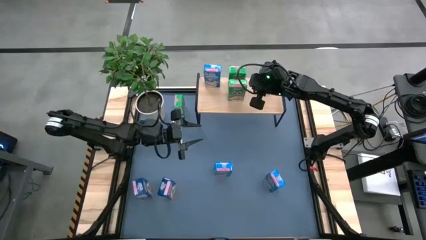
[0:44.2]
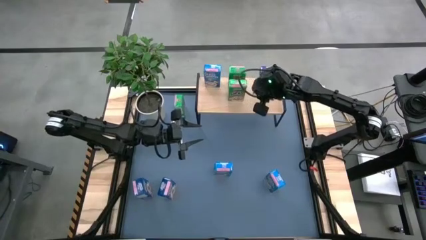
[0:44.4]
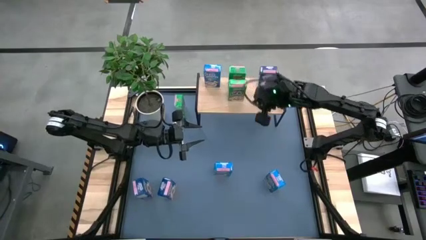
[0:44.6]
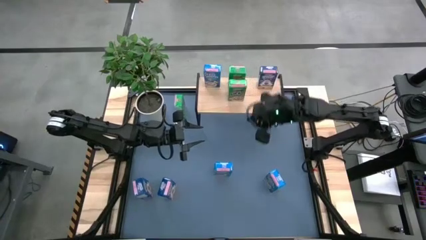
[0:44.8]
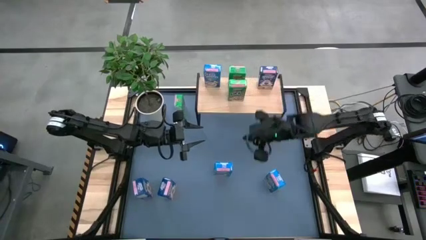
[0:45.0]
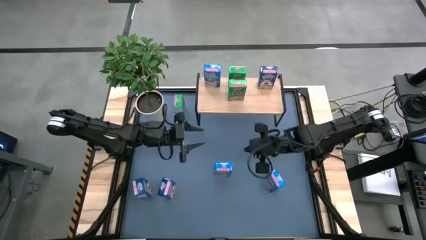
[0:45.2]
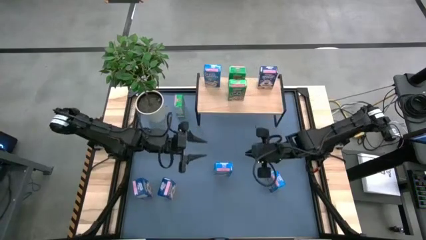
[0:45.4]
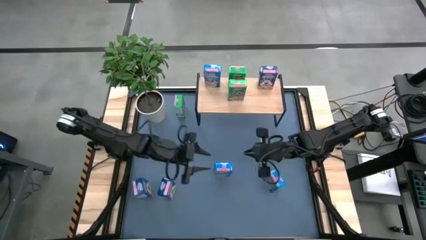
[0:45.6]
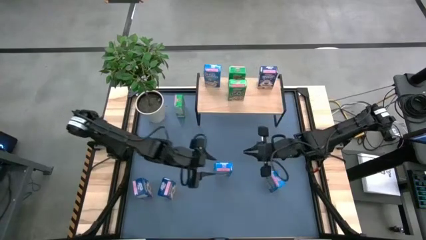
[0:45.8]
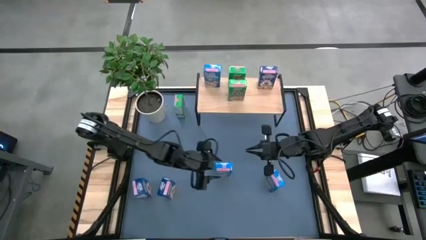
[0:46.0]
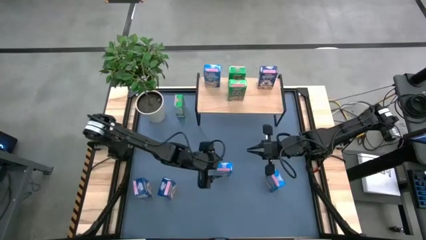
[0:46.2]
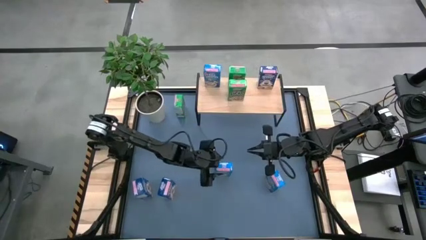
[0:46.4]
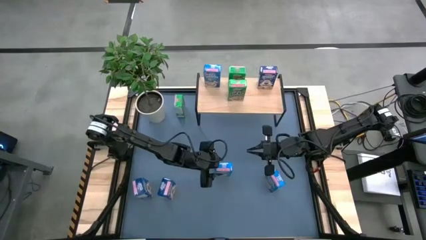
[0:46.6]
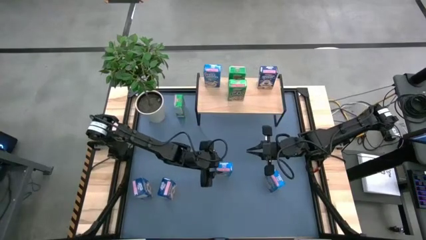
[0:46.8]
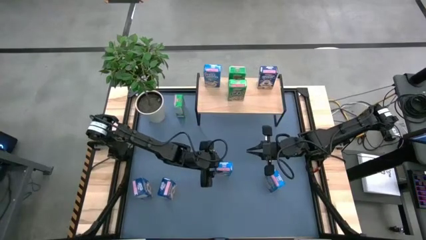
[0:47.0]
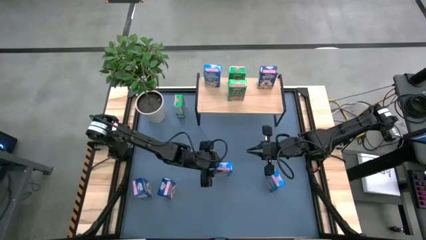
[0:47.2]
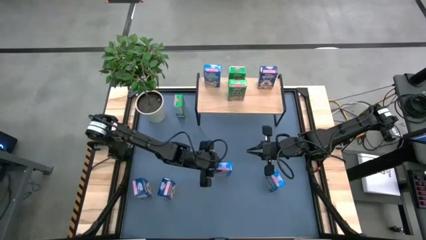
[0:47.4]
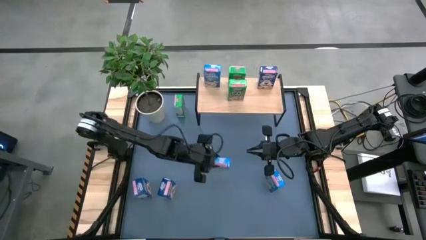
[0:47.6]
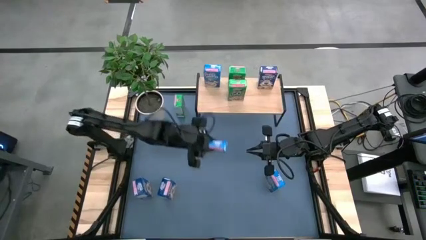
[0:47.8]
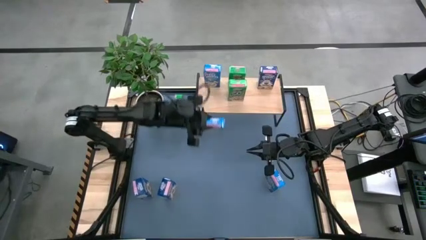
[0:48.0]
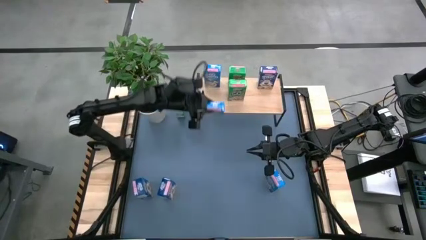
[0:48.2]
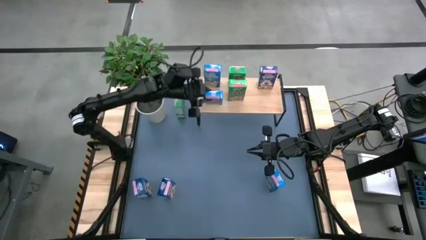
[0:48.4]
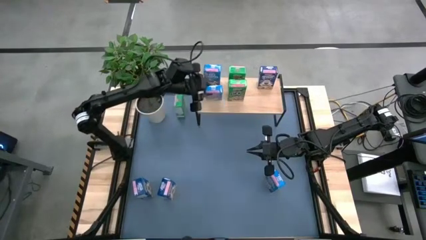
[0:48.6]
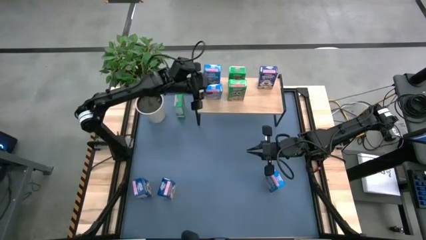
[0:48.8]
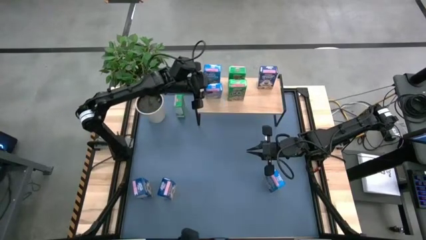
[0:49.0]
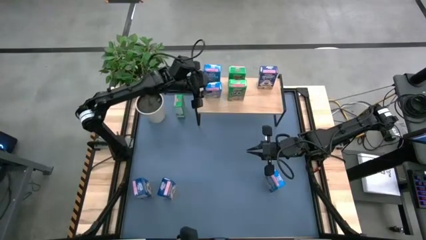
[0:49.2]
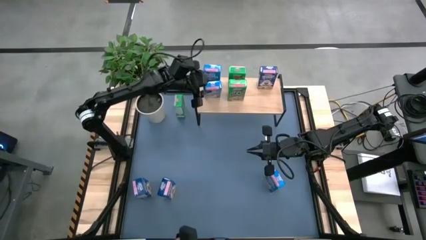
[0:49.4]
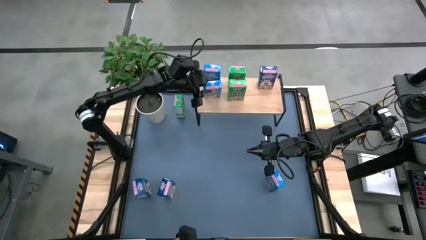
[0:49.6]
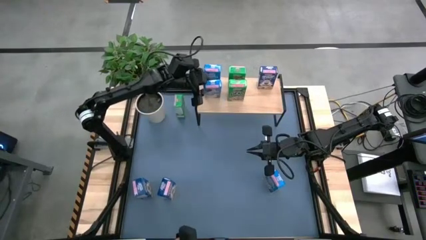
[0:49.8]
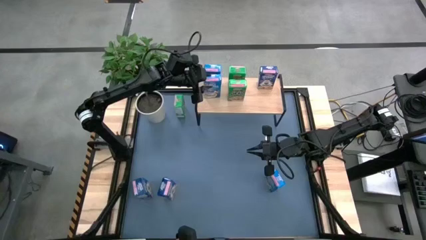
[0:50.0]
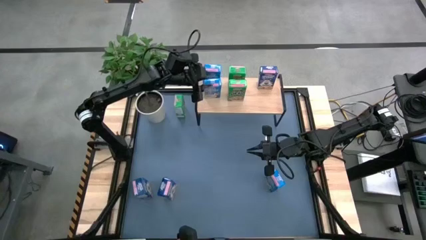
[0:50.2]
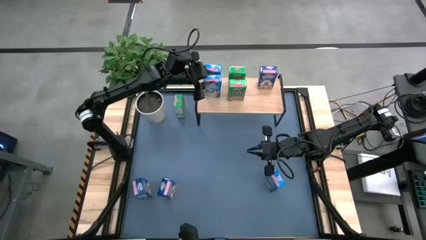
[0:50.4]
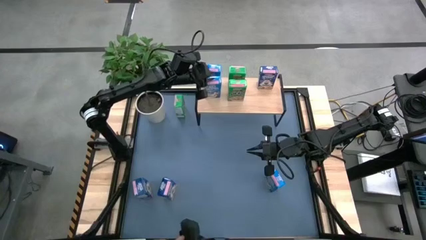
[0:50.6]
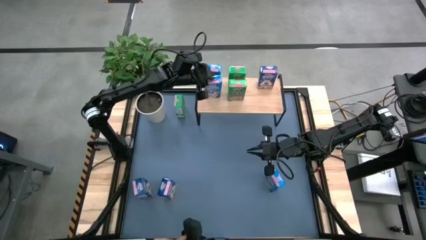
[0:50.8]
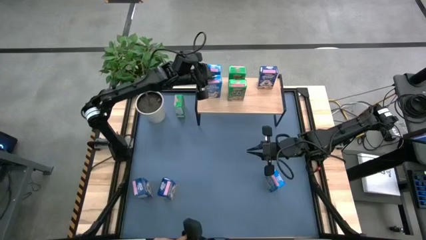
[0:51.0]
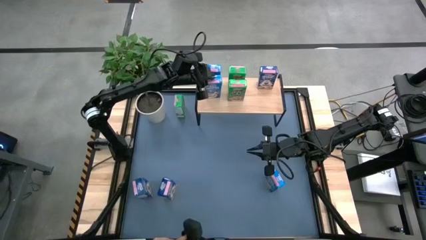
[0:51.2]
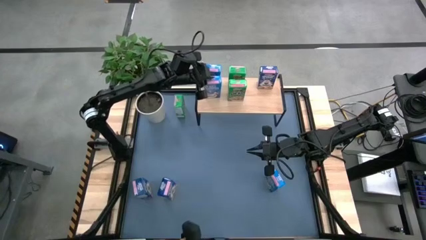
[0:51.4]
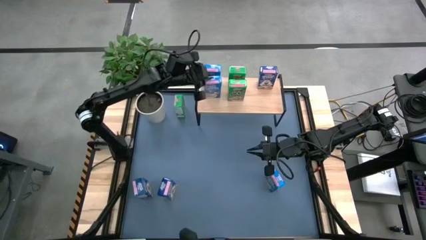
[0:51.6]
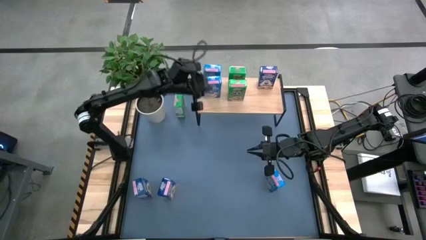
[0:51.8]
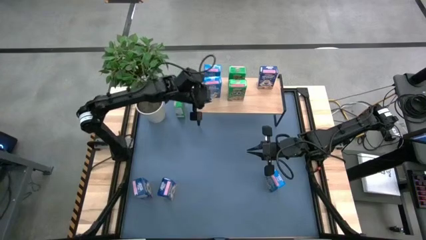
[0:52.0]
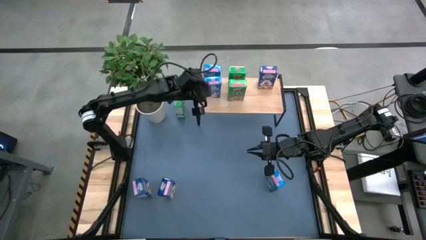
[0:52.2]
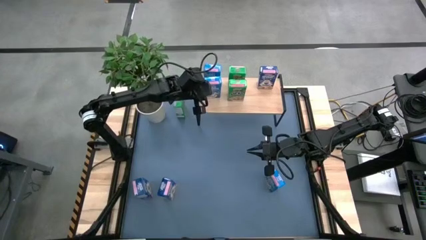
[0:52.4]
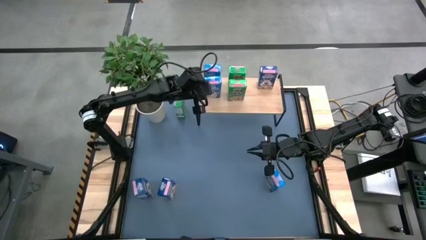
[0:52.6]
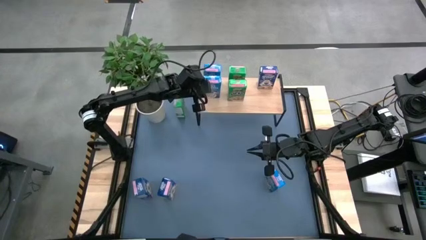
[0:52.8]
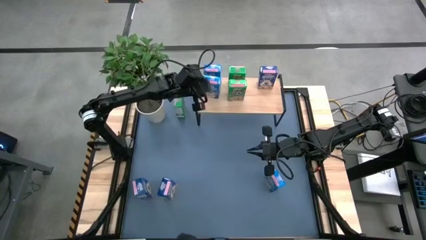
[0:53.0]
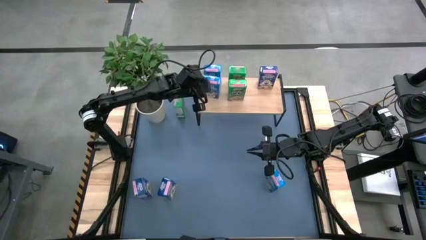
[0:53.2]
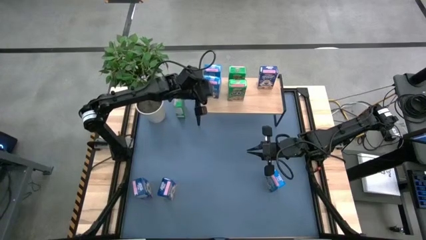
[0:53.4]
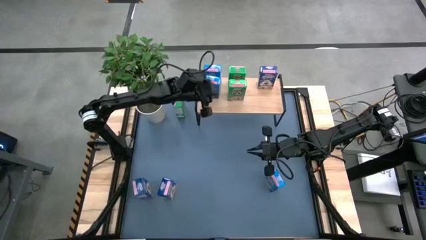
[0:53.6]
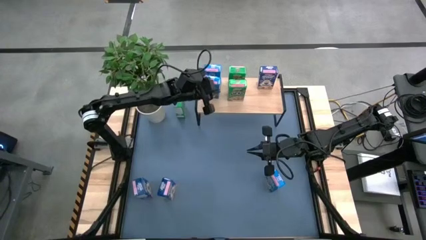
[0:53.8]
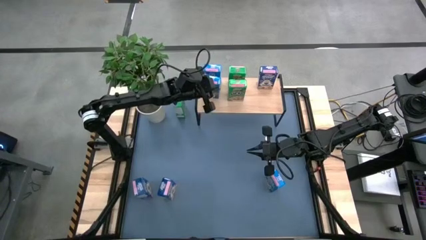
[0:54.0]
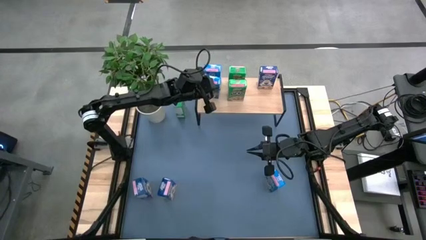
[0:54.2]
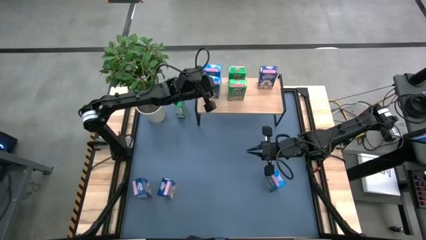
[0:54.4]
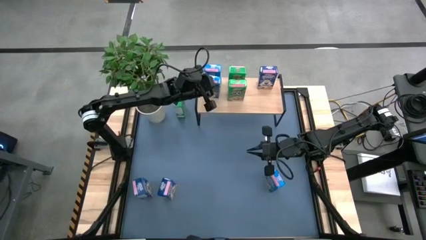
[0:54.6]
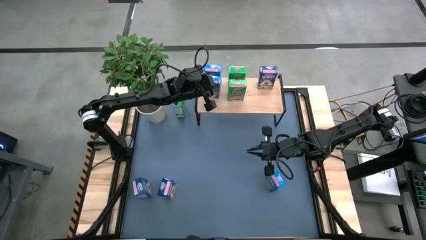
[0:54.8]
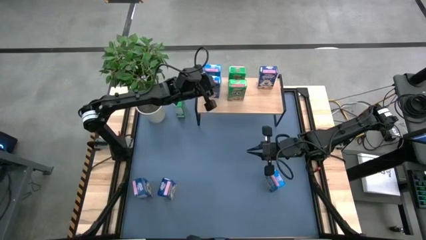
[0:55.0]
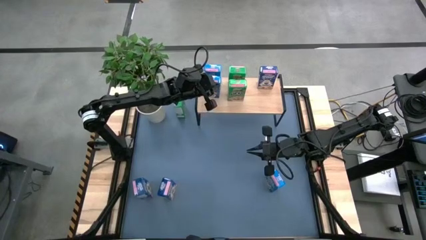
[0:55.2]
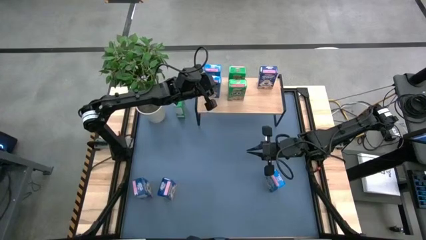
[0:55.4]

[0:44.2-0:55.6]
Task: Stack cereal on shelf
Put the left light blue cereal box on the shelf aligned with the other light blue cereal box
